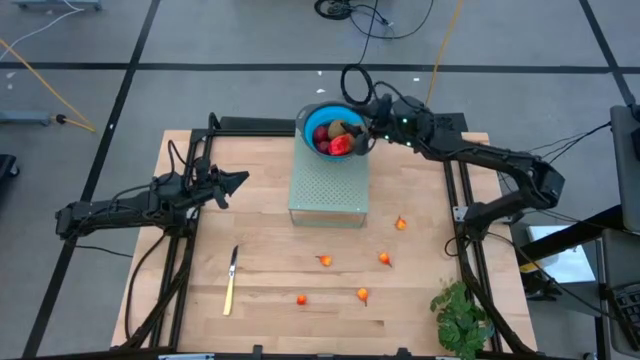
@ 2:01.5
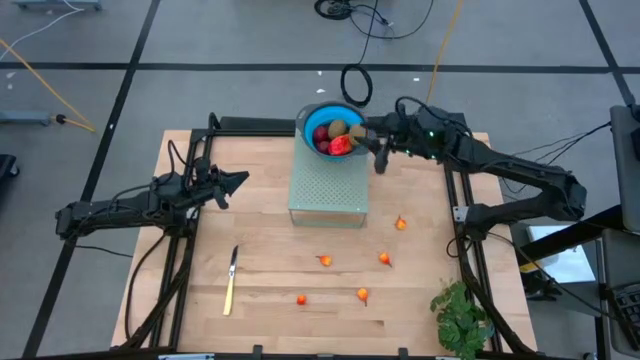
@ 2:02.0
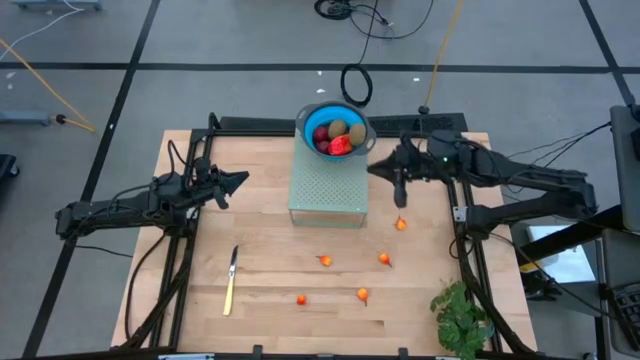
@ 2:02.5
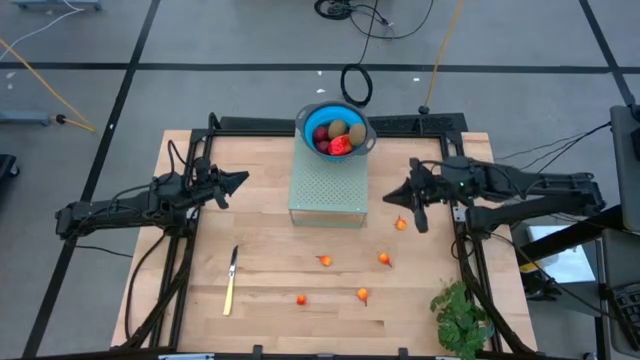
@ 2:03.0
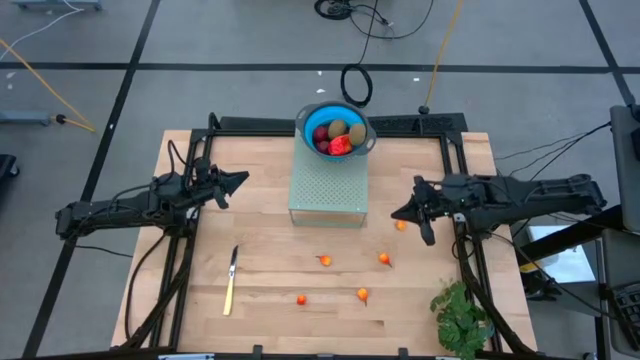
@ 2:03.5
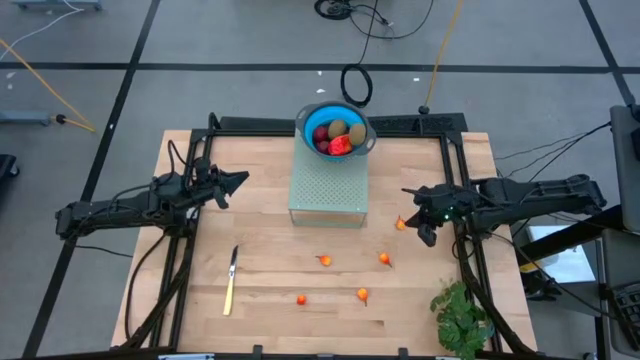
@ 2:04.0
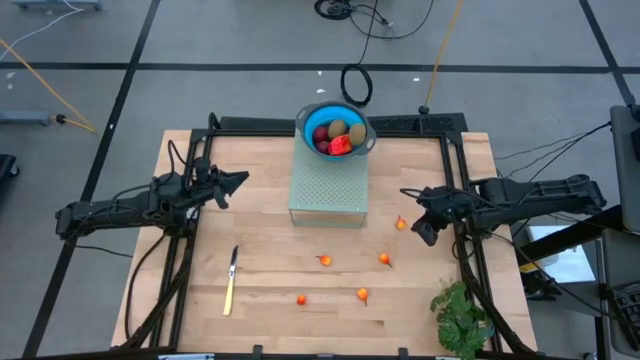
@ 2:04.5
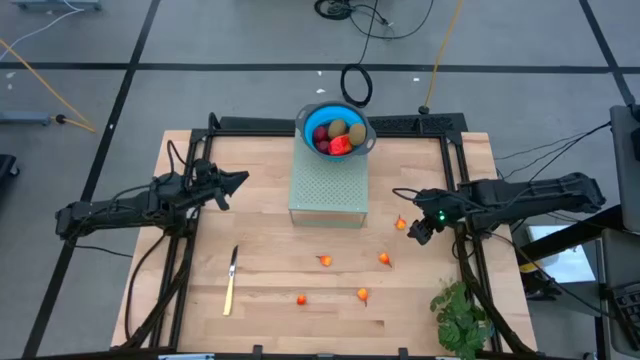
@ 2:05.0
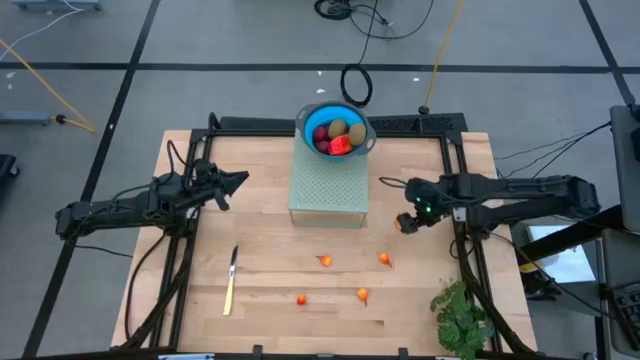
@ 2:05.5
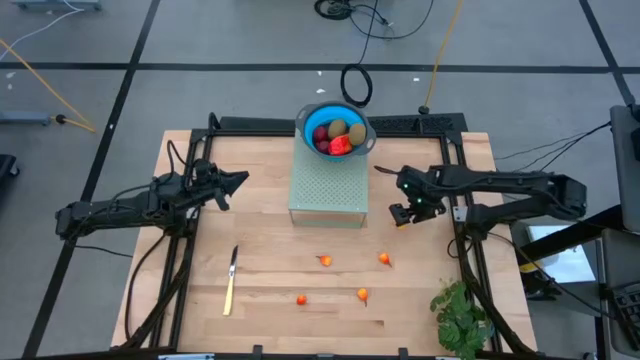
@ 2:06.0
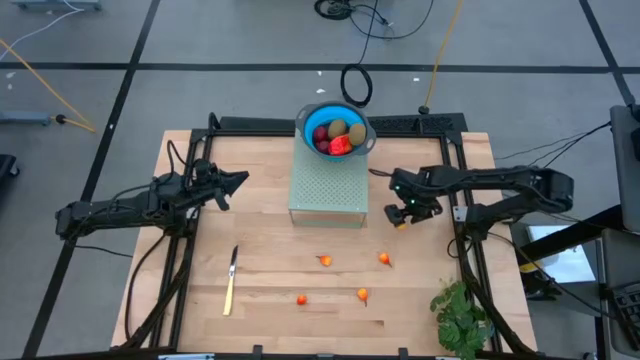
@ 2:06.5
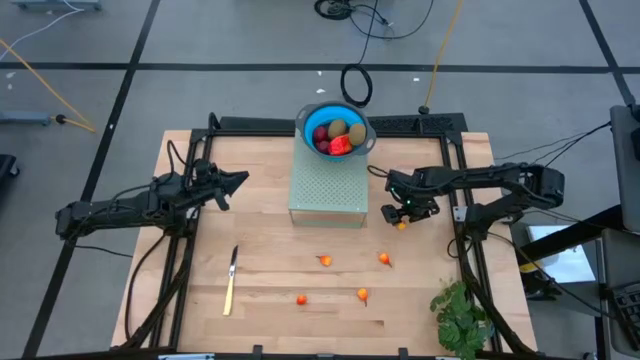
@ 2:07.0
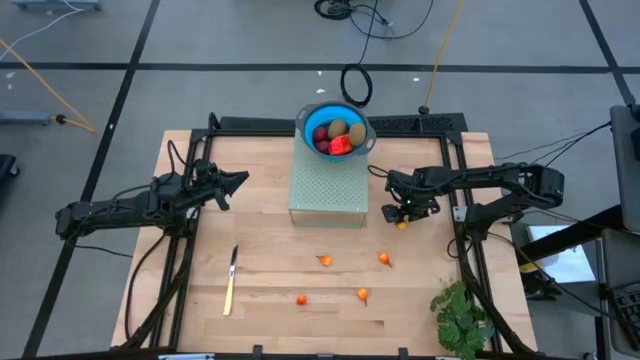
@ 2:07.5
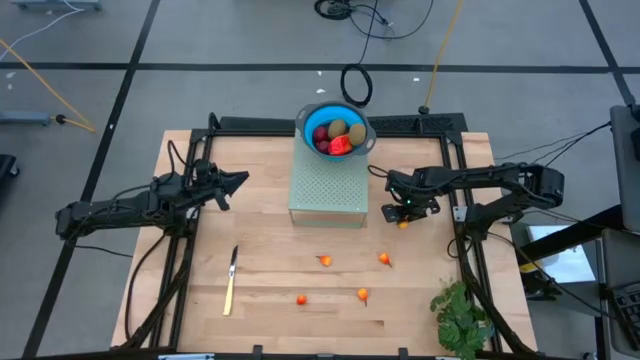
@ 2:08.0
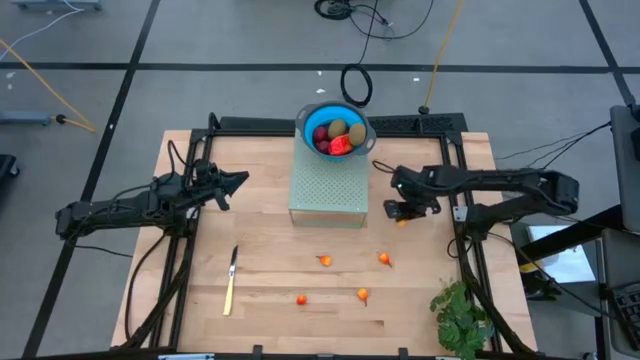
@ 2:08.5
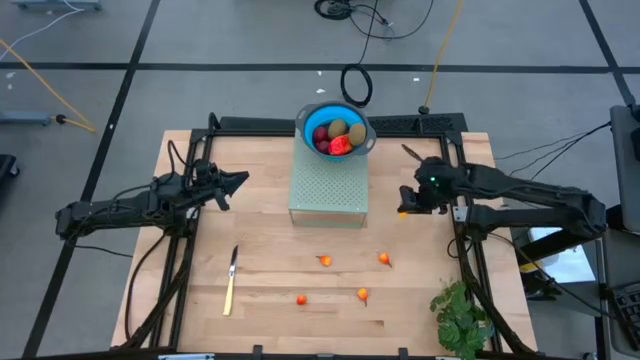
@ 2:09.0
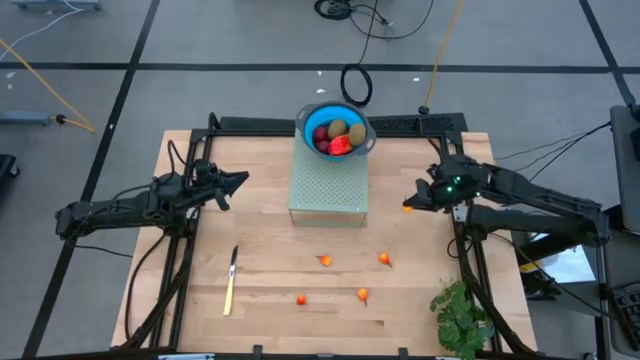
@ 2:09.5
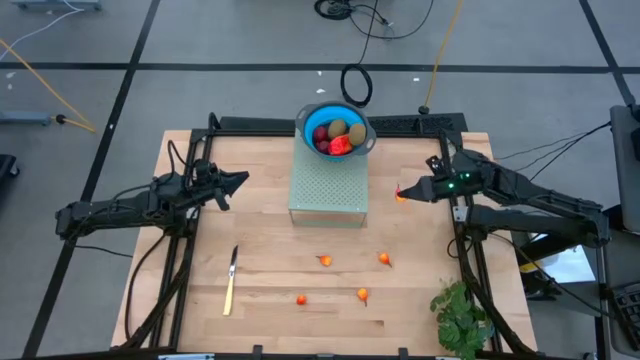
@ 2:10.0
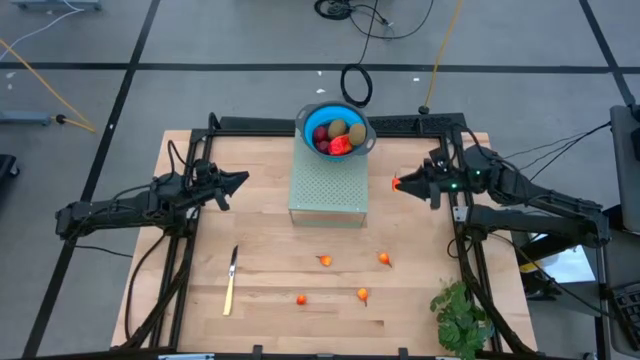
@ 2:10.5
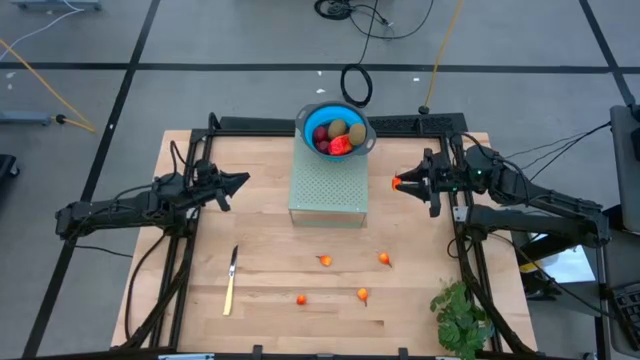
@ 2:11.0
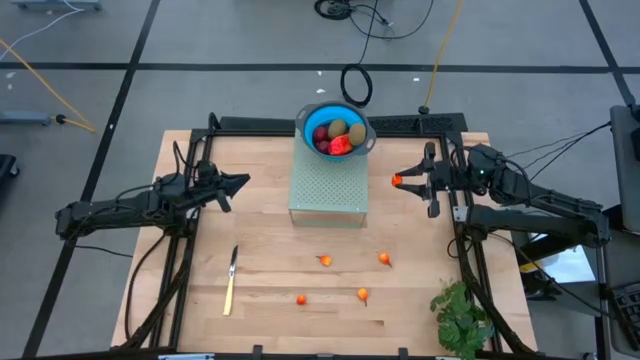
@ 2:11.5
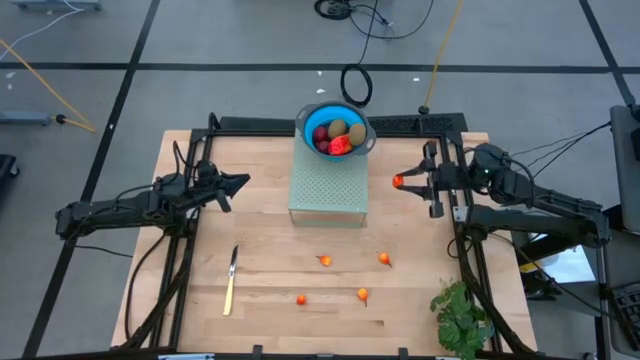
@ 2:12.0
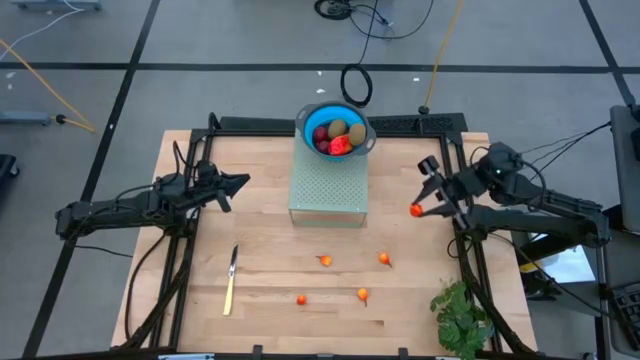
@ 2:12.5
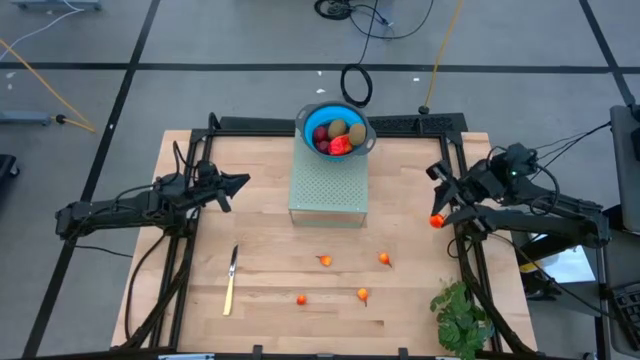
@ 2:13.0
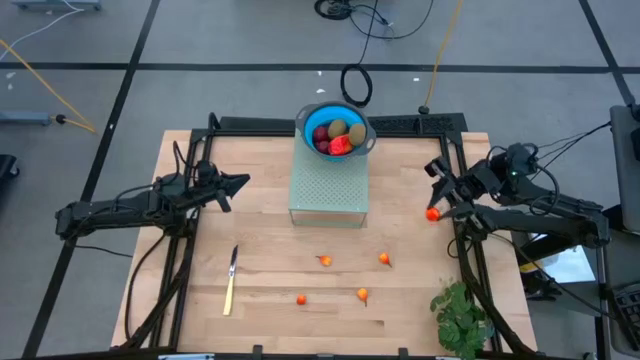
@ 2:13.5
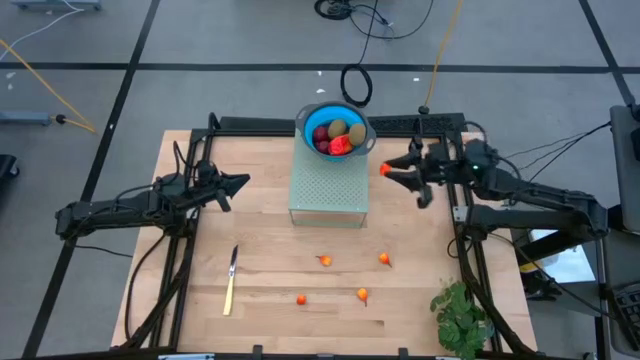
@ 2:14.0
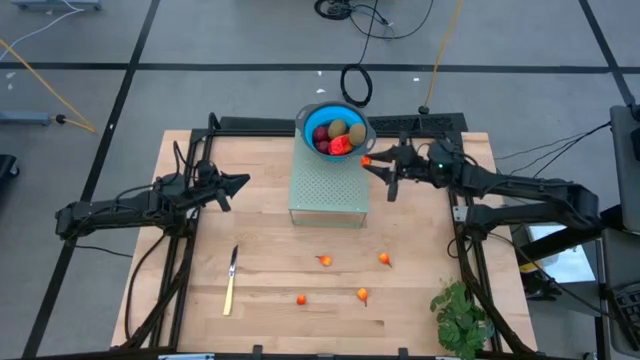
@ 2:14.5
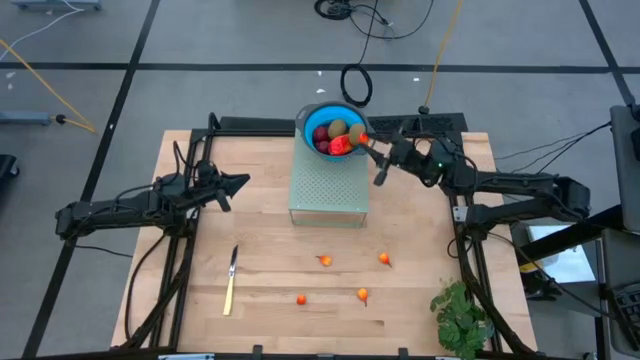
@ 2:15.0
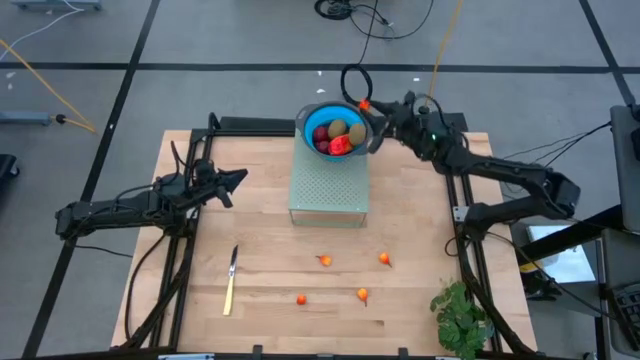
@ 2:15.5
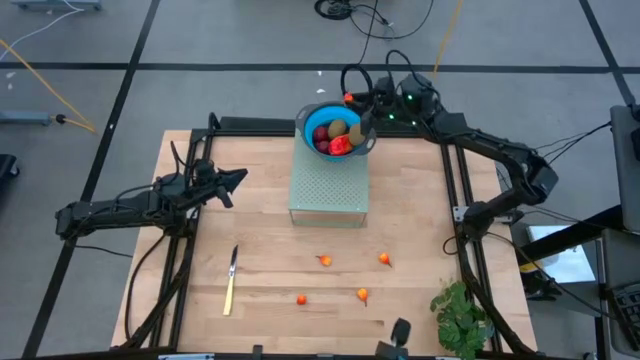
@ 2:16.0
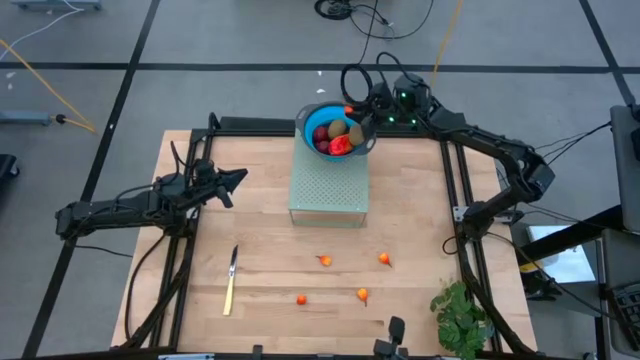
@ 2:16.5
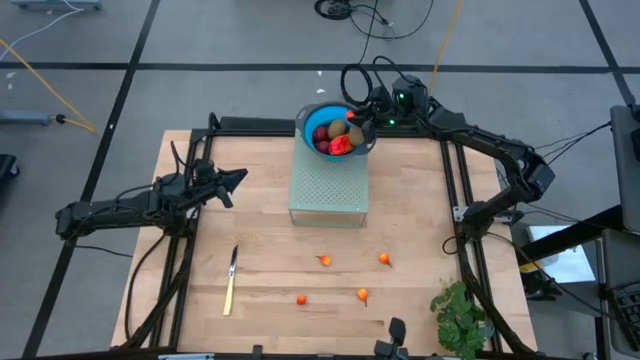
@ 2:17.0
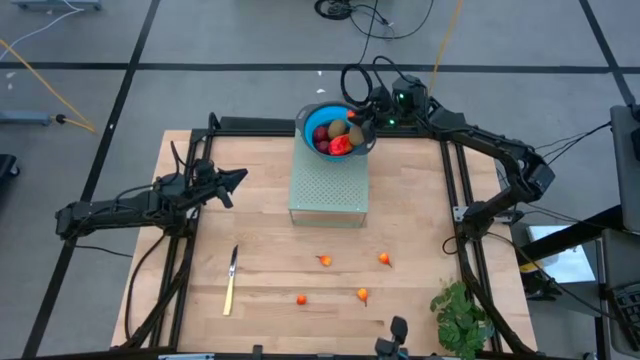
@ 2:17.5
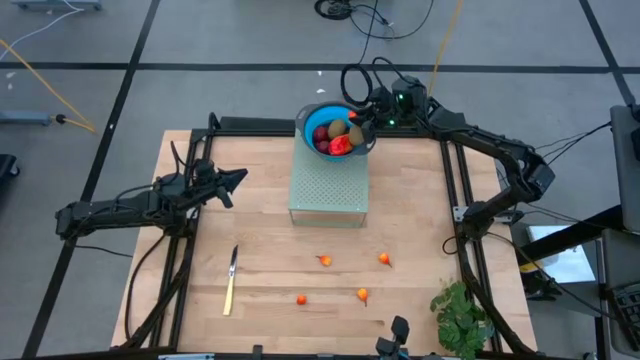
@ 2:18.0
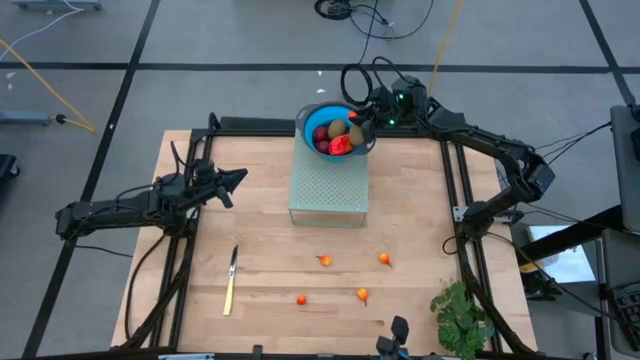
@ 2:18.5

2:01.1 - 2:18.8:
Task: Pick & Place Fruit
Put the peach into the blue strainer bowl on the shelf

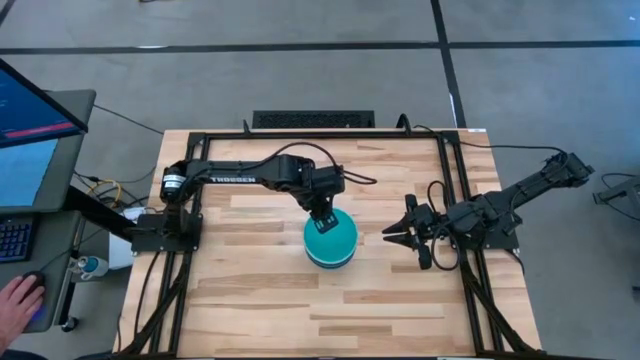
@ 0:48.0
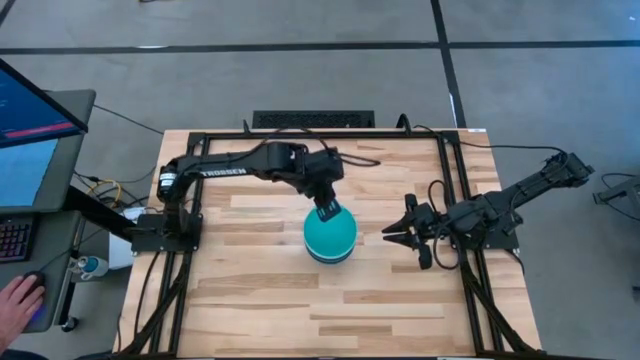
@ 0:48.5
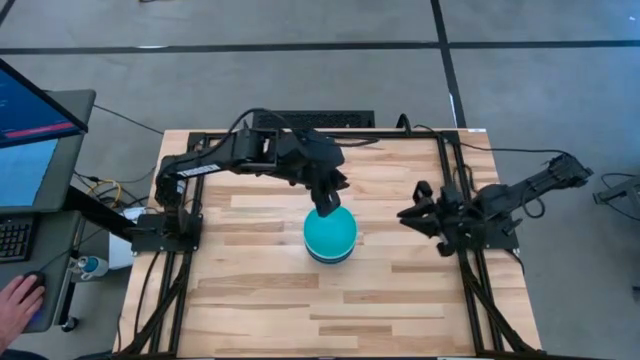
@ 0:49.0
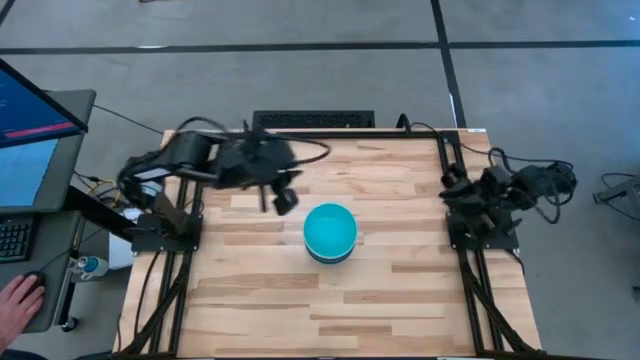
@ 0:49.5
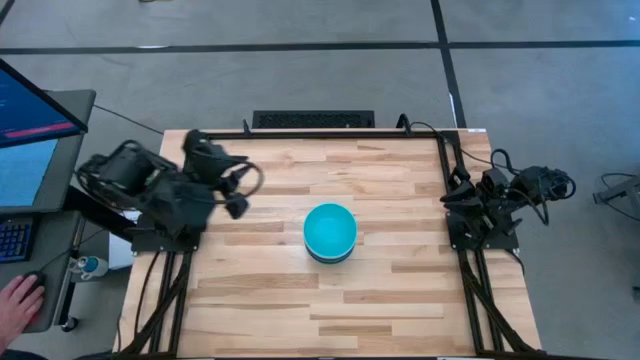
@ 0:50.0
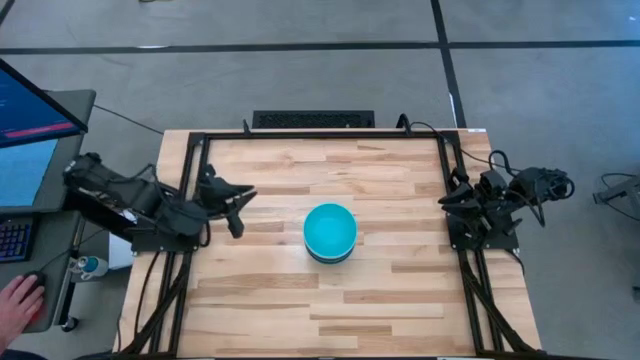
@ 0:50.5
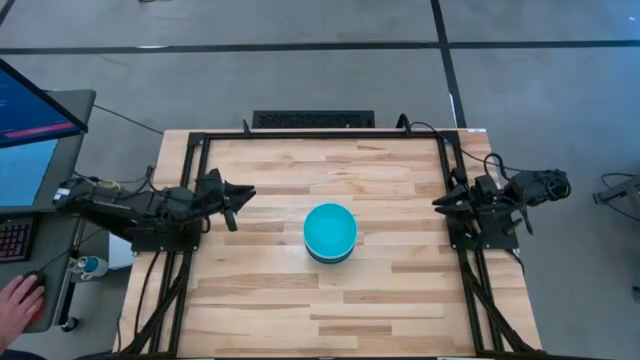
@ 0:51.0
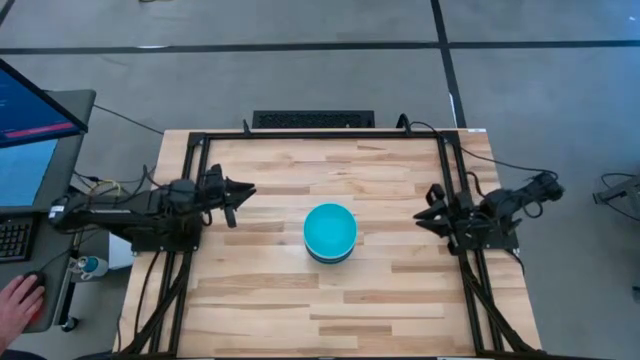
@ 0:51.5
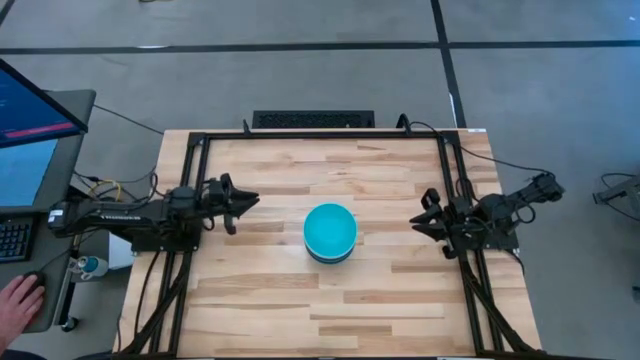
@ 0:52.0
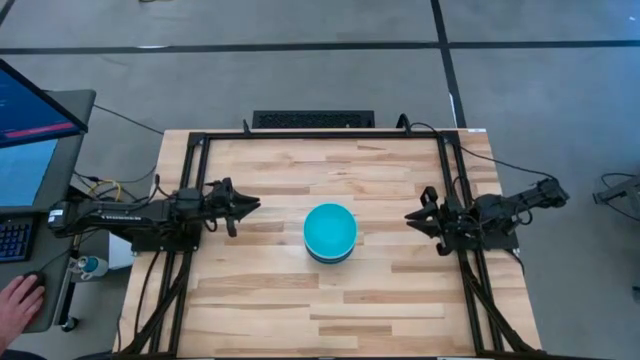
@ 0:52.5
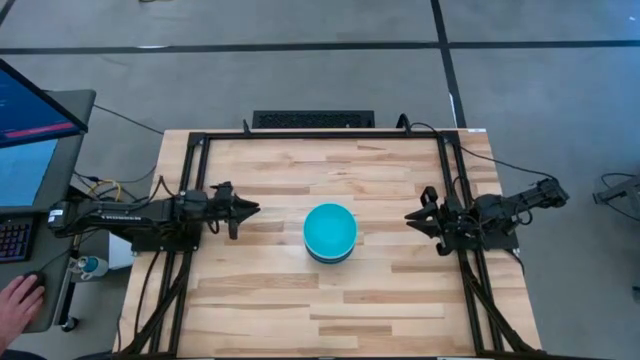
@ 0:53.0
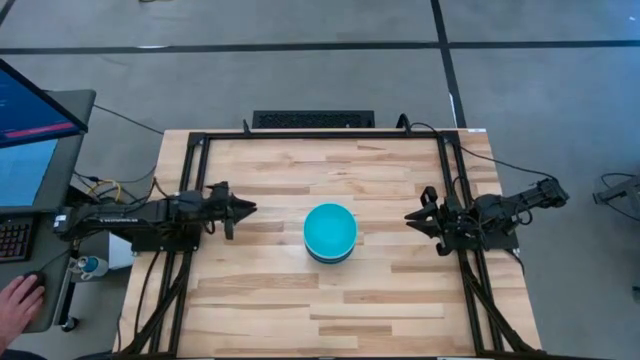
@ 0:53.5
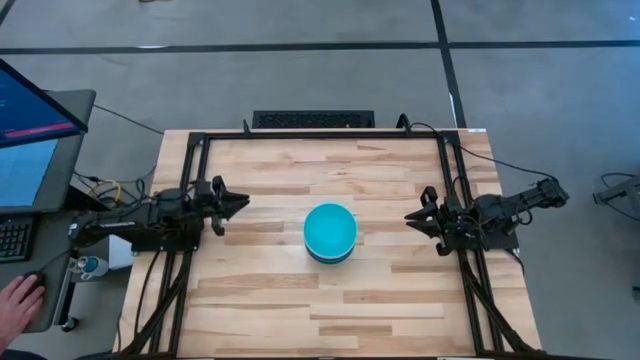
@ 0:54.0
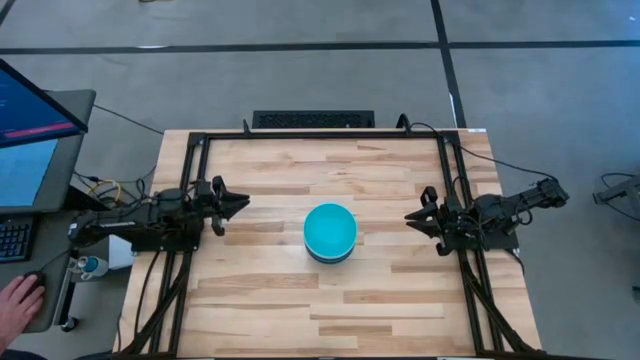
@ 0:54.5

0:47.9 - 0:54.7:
Task: Nest bowls inside each other
Return to Home Position
